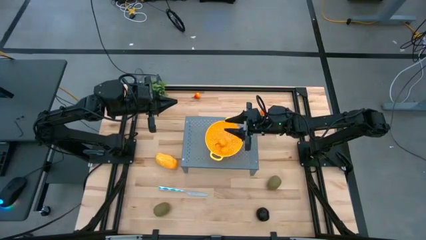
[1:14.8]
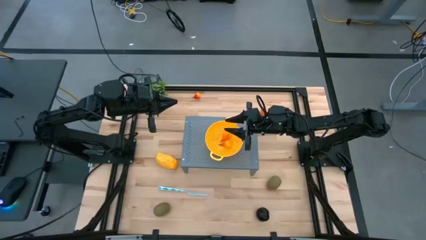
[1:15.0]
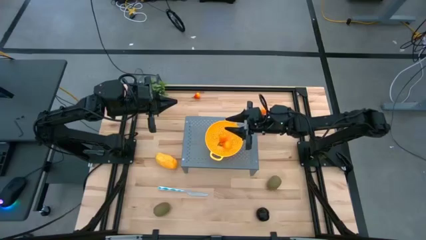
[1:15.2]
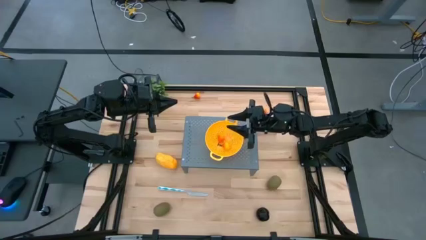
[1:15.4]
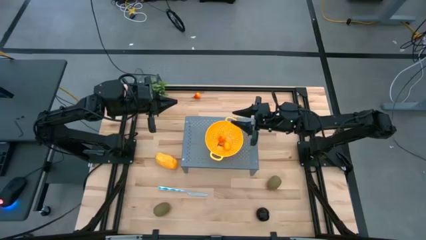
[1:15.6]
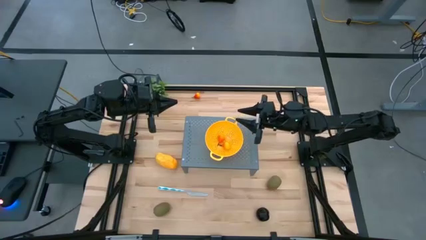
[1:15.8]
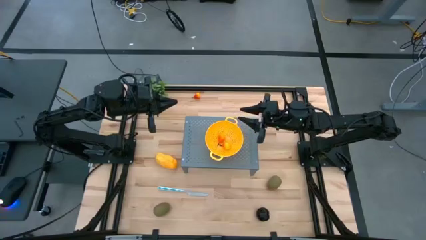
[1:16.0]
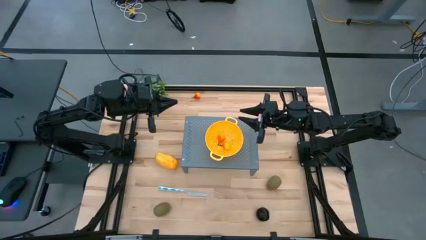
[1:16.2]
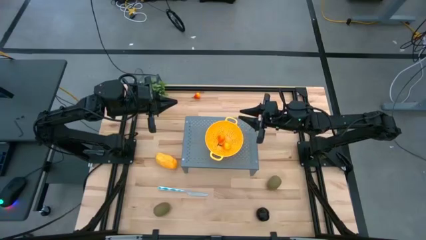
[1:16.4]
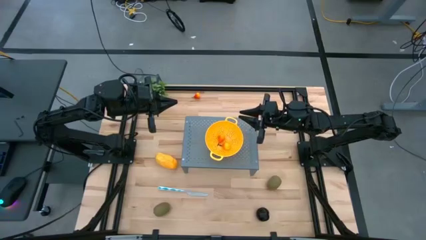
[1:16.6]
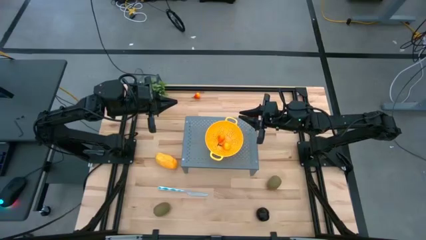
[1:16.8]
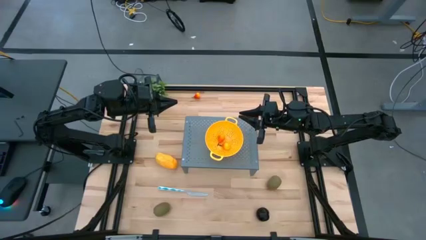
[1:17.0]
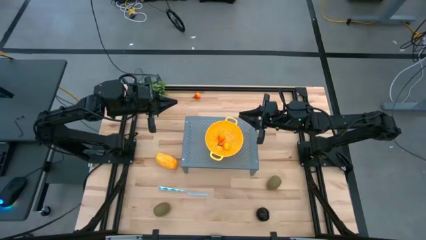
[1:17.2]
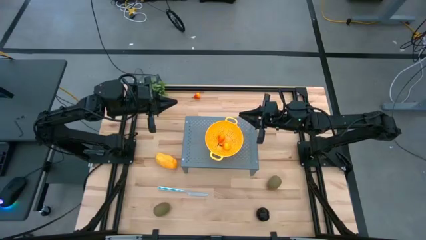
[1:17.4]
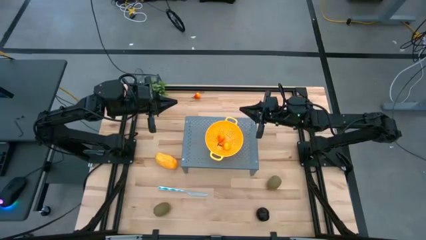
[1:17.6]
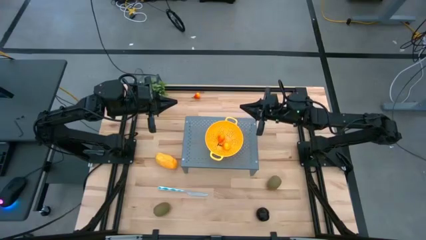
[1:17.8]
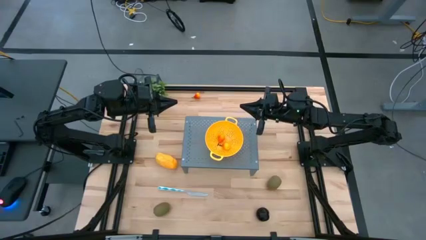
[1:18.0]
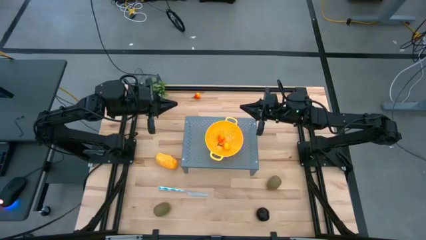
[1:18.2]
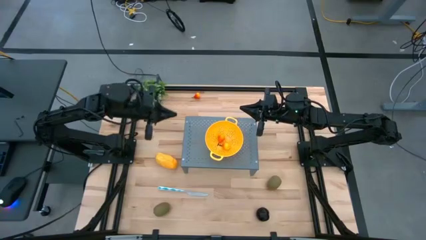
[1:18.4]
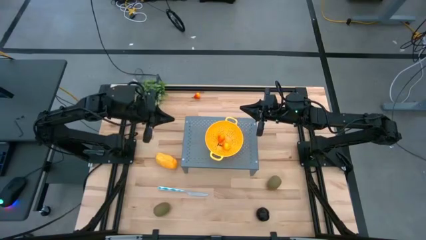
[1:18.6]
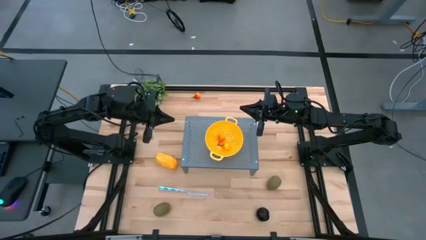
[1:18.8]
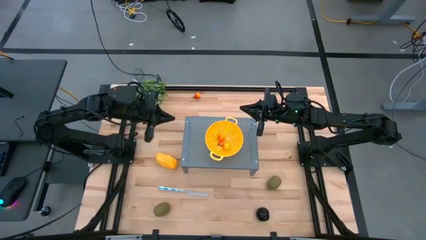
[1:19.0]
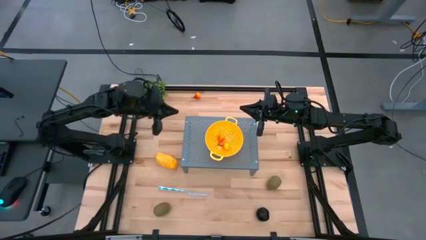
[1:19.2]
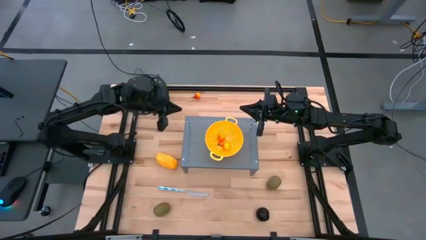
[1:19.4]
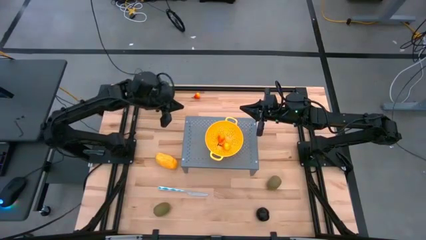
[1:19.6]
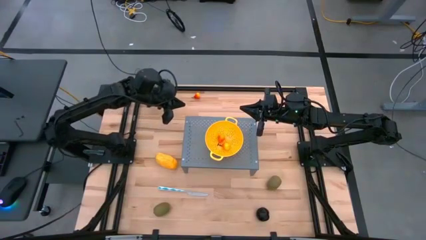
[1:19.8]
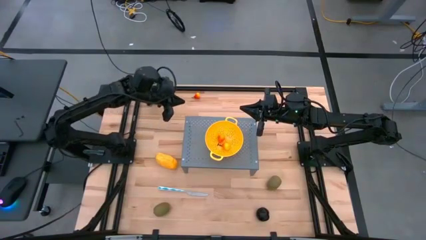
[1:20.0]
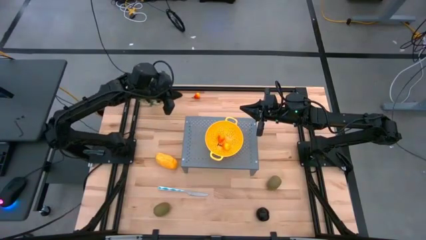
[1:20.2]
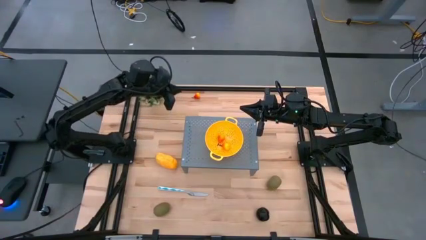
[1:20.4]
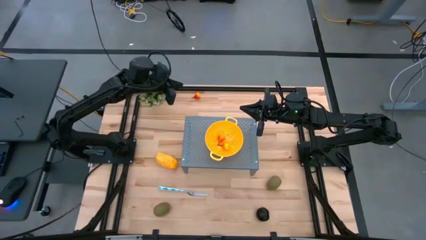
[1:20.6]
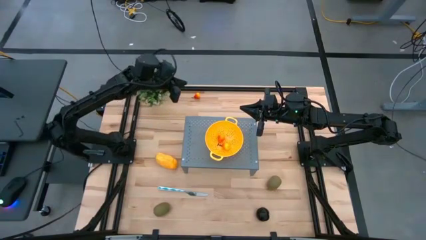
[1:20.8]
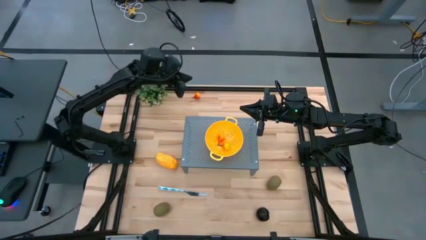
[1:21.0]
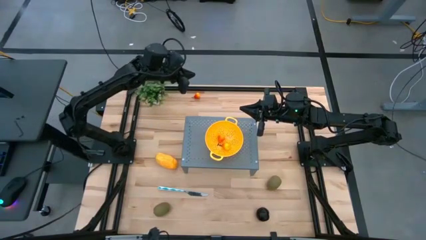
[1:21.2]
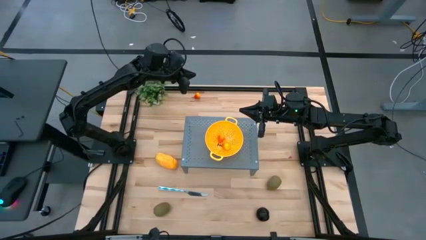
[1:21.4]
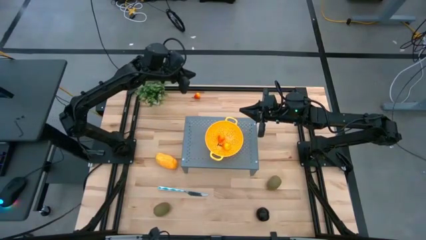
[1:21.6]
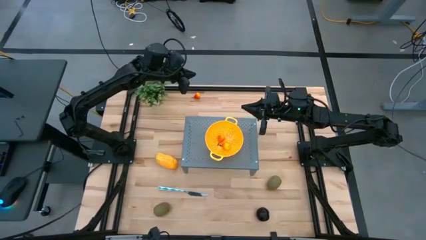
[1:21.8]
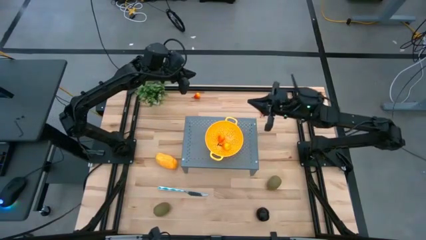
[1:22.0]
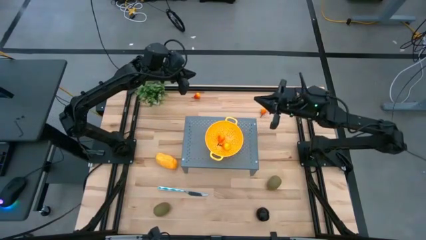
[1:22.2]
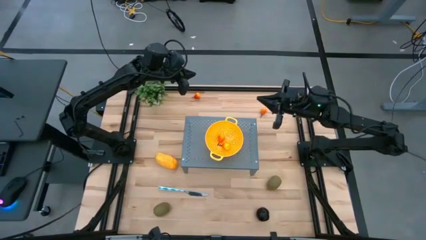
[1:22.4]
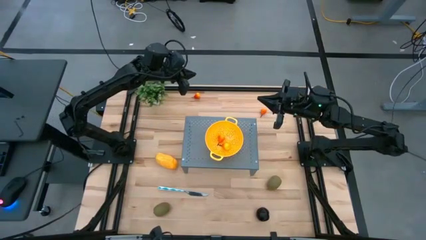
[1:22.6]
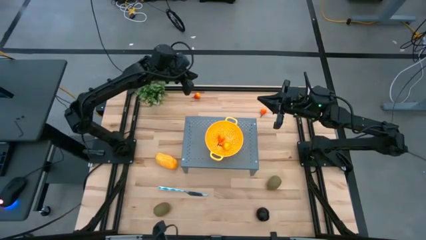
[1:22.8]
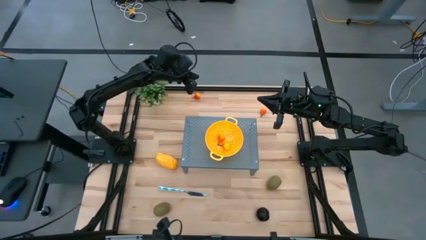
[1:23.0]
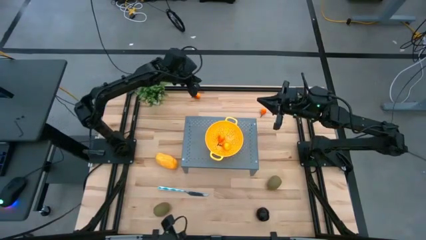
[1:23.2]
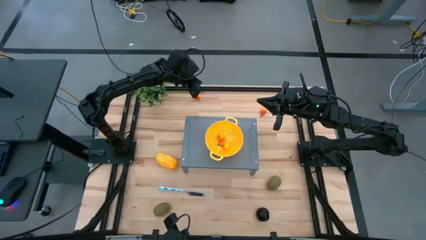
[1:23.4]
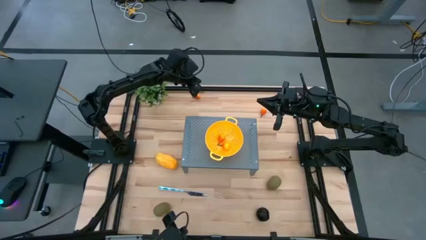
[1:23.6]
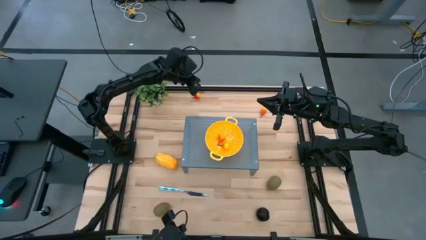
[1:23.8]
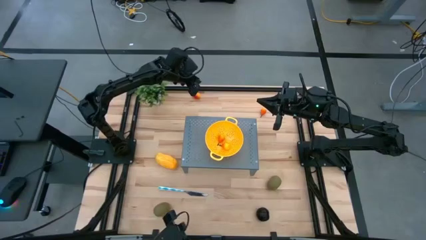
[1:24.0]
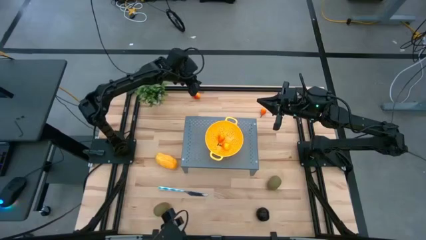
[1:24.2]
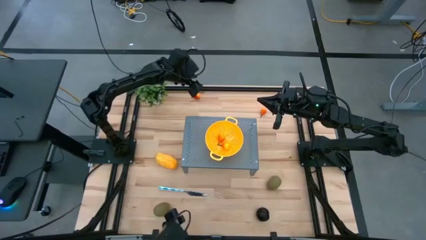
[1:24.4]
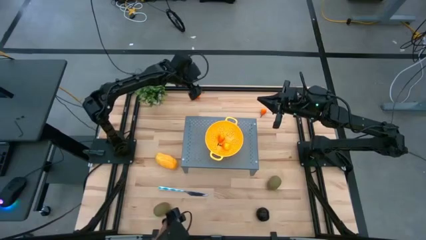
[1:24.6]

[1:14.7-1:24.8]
Task: Pick & Place Fruit
Put the right pear into the strainer bowl on the shelf

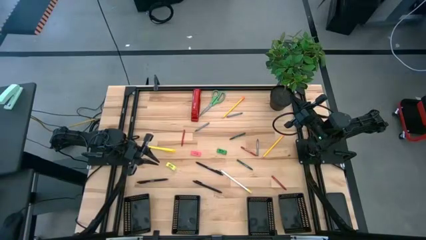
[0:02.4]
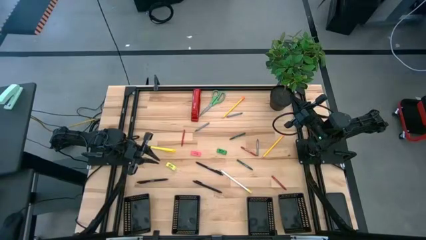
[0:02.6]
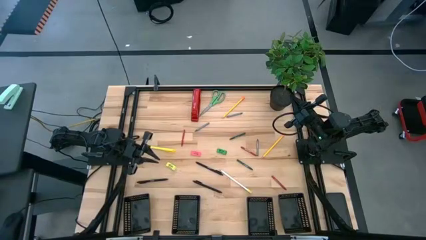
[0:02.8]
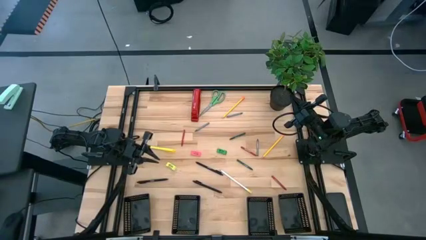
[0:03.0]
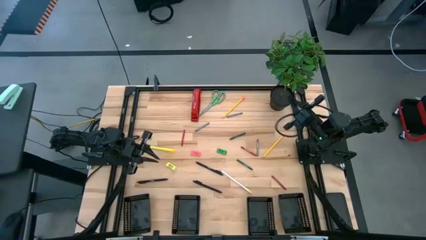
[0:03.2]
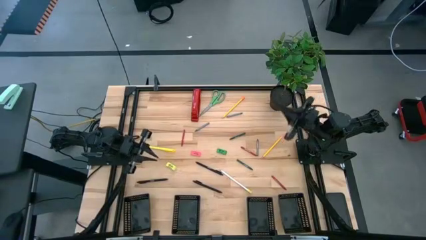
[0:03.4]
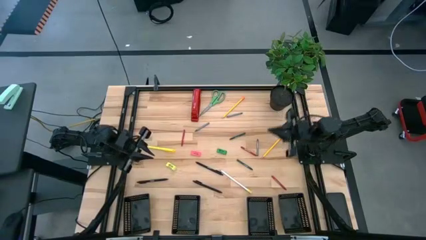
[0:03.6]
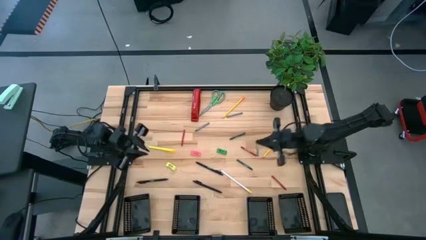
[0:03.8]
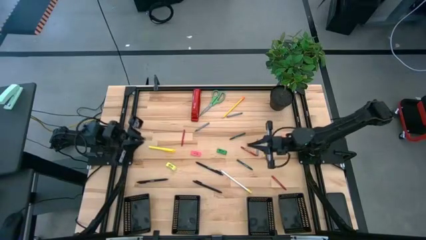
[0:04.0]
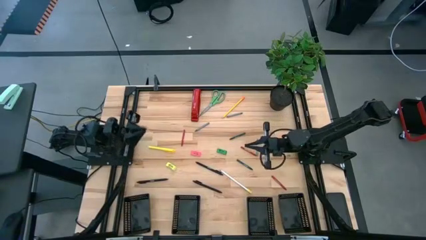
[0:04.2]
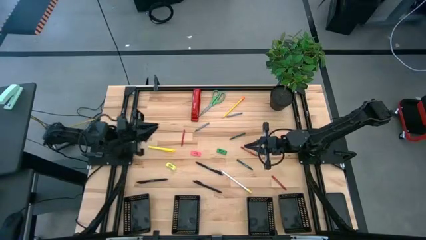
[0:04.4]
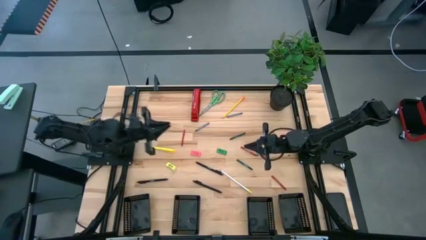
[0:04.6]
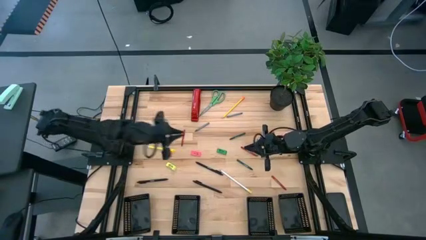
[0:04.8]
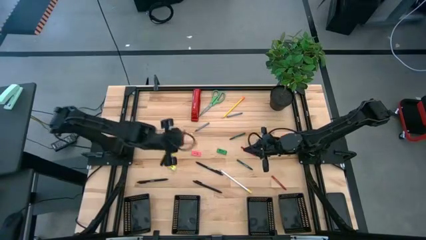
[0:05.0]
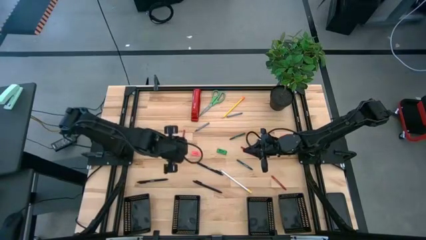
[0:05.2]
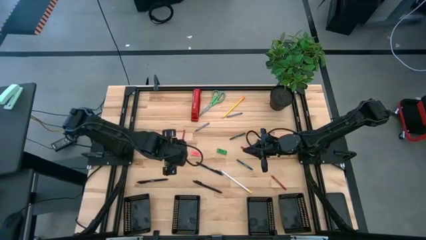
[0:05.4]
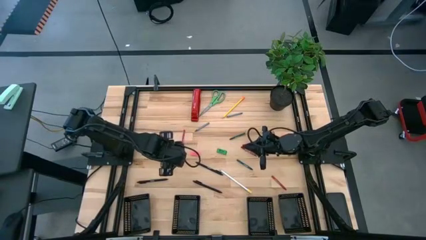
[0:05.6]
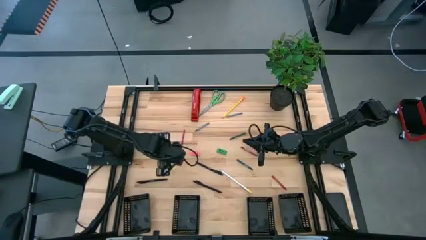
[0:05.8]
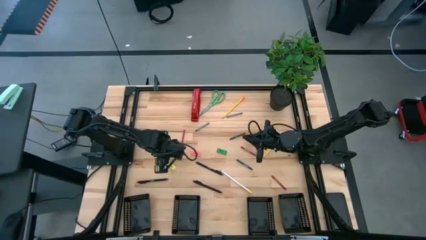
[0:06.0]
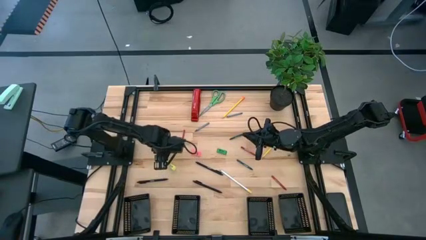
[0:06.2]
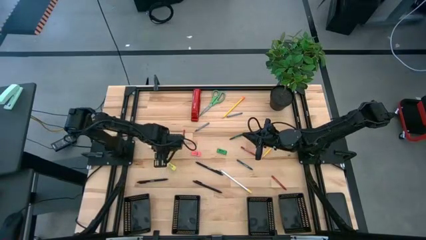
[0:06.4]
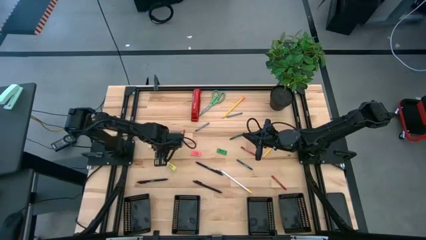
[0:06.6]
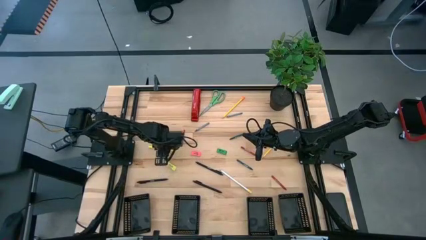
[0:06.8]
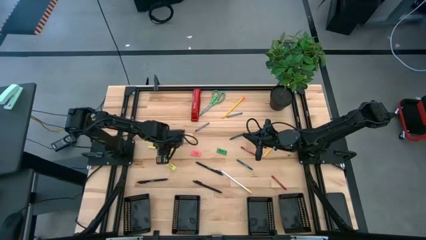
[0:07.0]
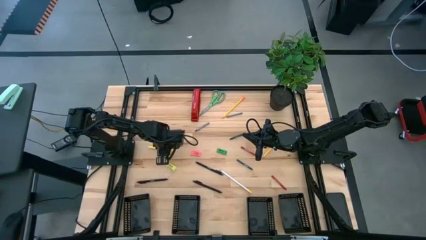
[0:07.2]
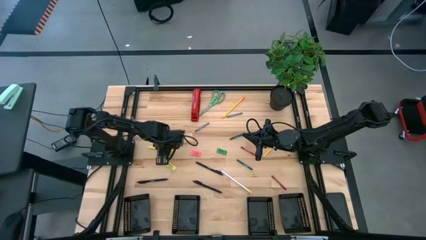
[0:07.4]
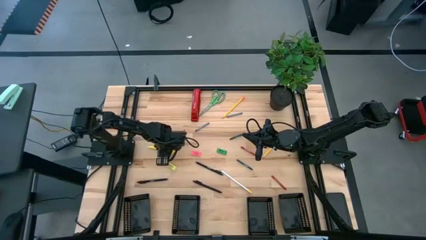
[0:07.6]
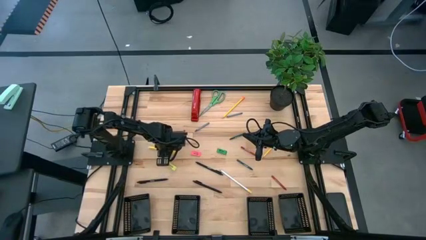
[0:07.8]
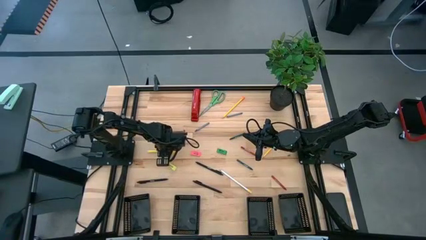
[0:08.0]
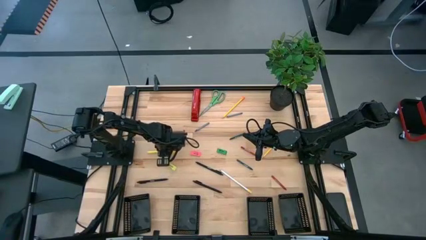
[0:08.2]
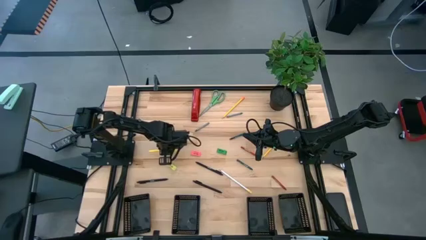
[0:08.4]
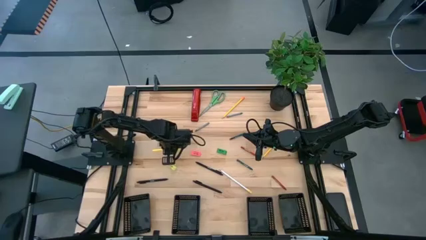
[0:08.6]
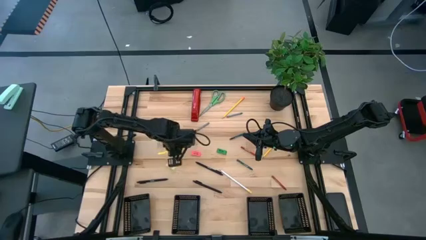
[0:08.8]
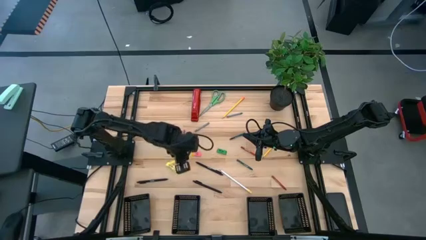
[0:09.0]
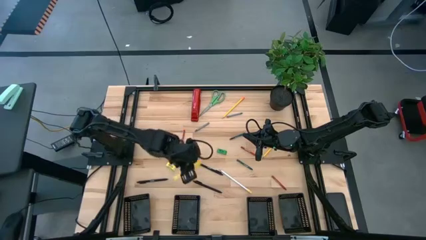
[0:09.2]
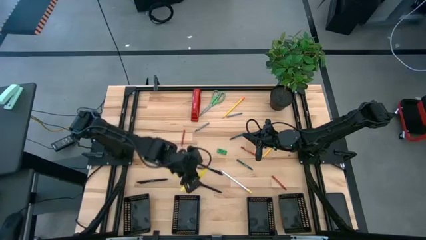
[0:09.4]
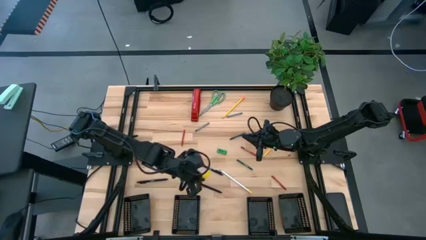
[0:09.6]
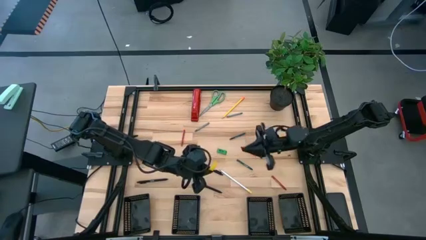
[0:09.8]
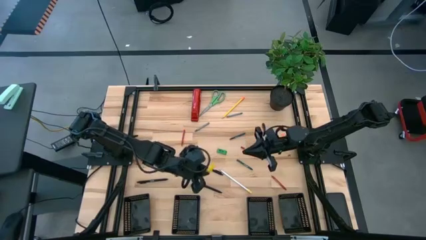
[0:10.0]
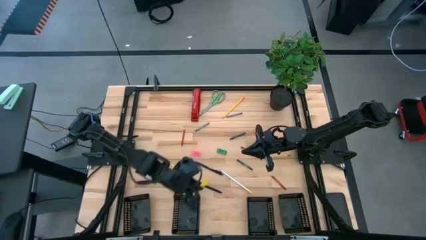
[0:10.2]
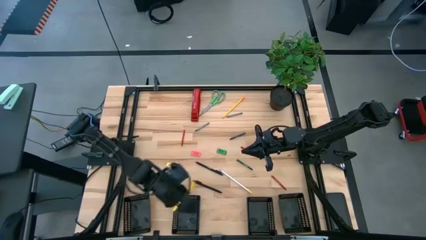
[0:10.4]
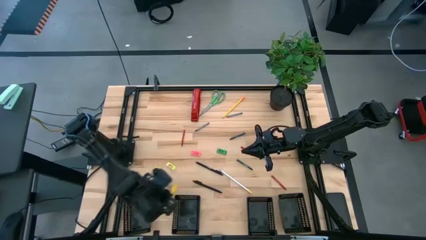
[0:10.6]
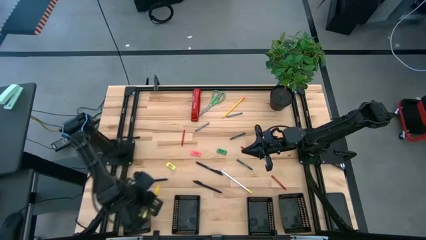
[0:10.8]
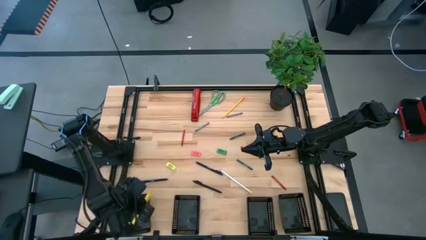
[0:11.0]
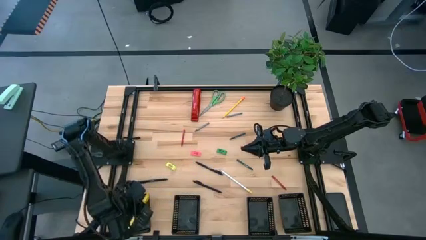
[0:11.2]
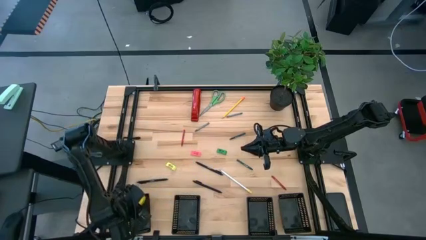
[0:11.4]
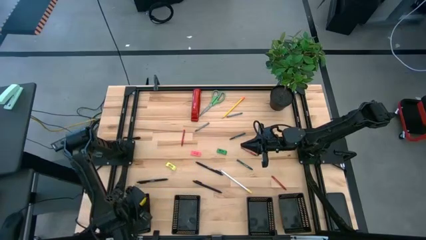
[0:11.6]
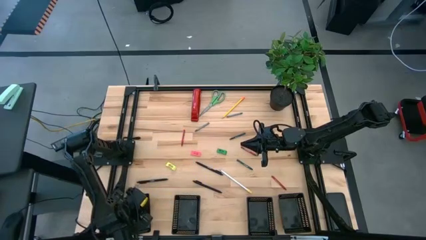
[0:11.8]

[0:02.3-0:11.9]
Task: Sort crayons/erasers/pens/pencils in bins
Put the yellow pen into the left black bin
